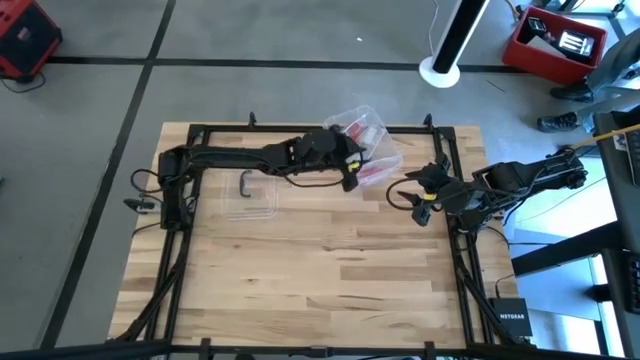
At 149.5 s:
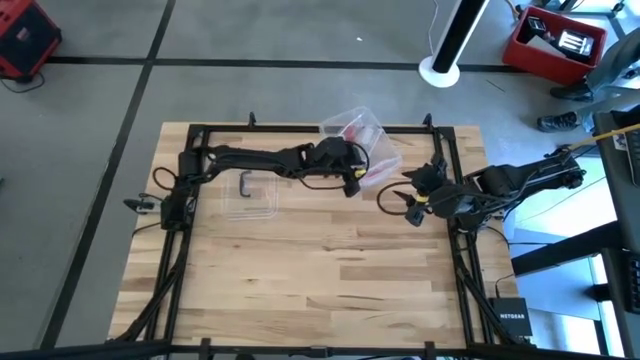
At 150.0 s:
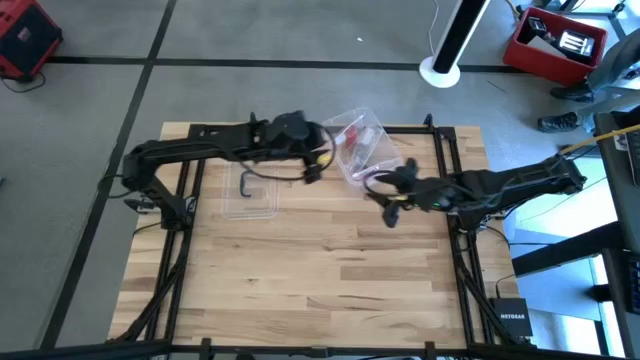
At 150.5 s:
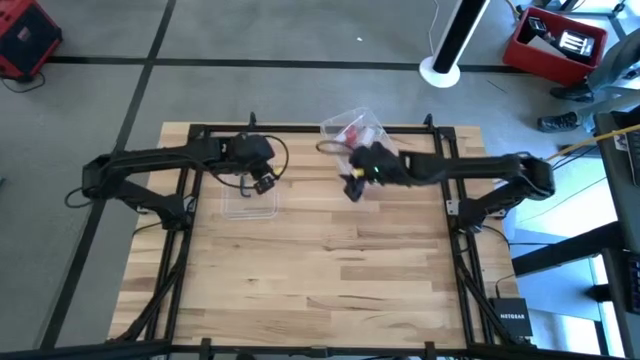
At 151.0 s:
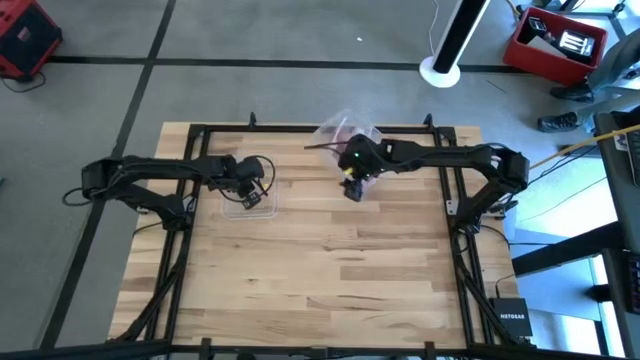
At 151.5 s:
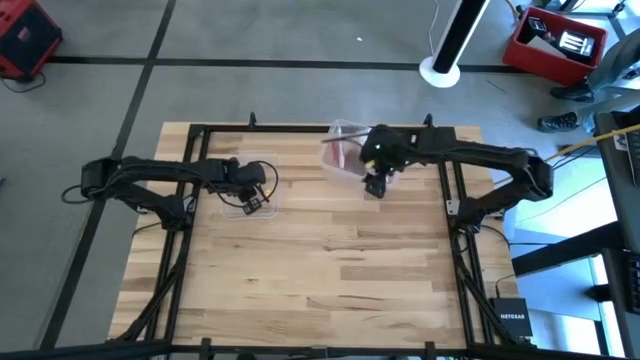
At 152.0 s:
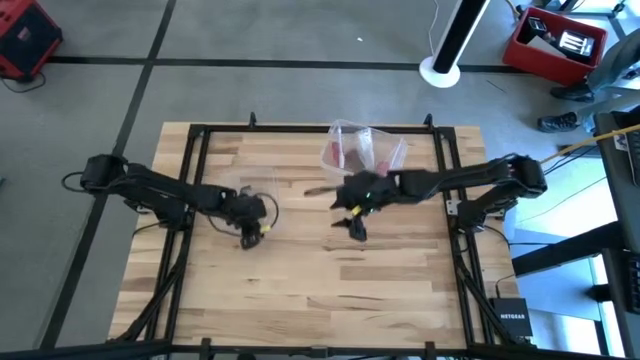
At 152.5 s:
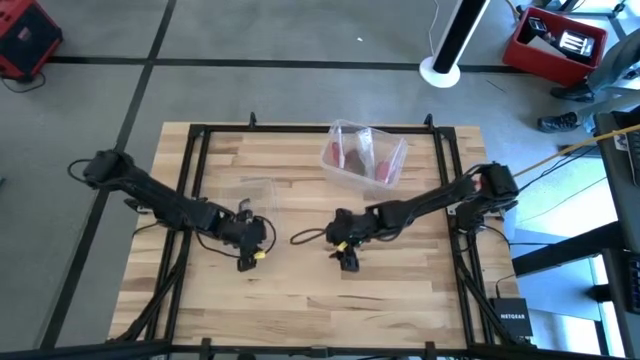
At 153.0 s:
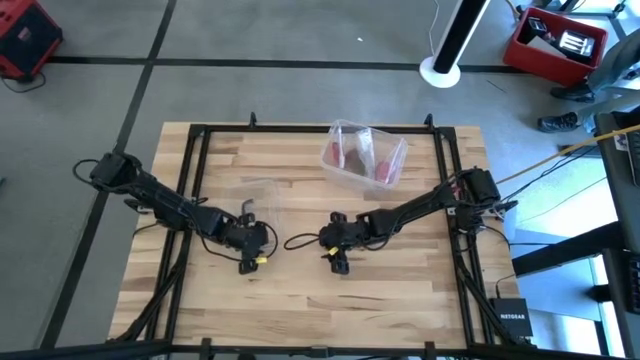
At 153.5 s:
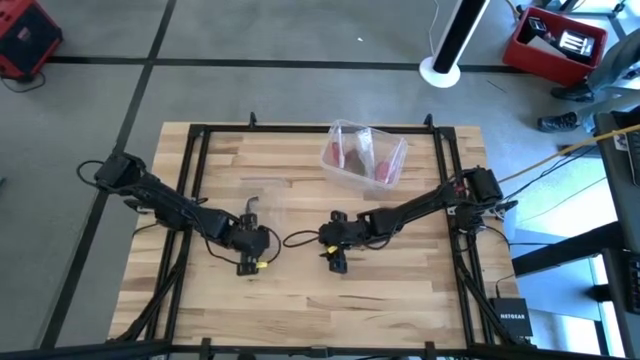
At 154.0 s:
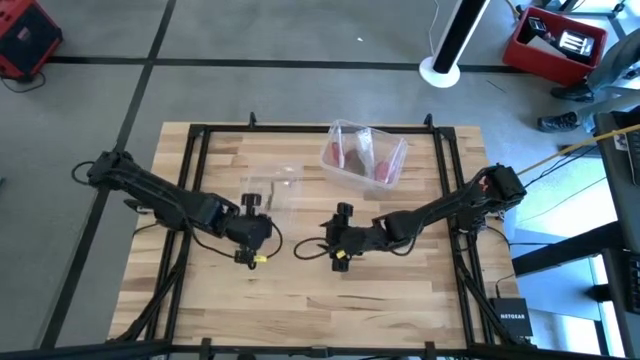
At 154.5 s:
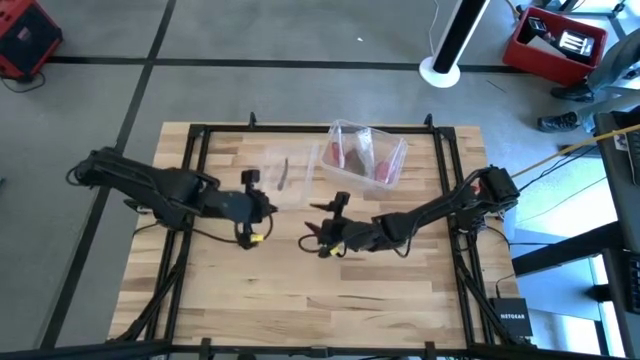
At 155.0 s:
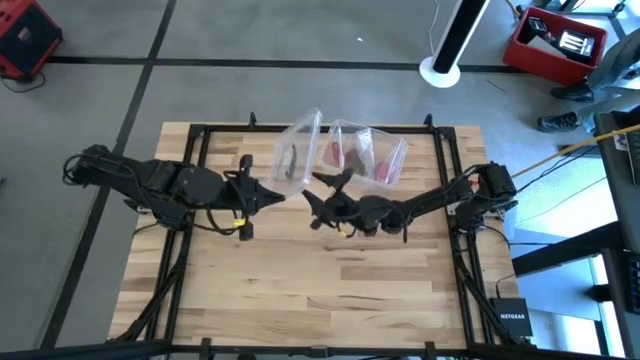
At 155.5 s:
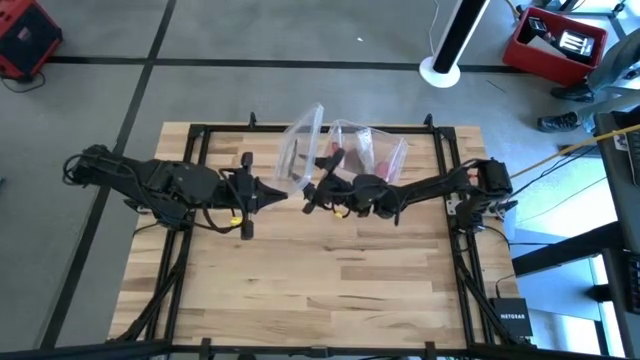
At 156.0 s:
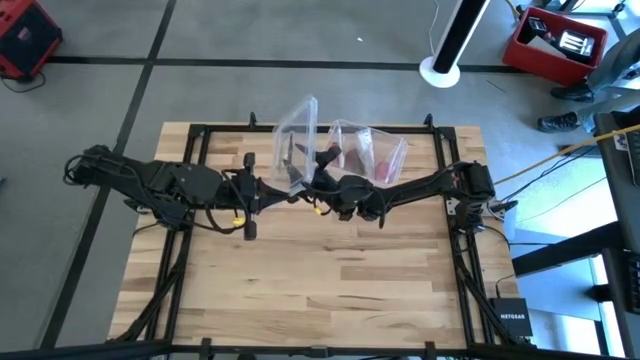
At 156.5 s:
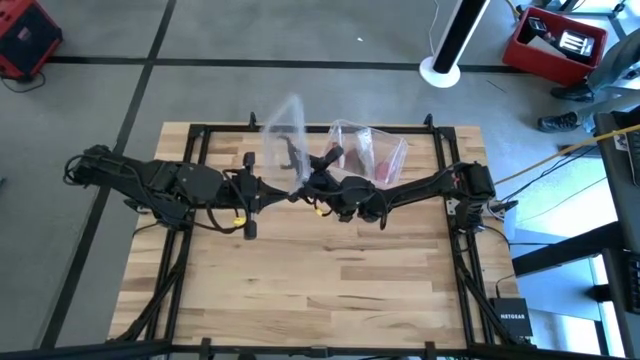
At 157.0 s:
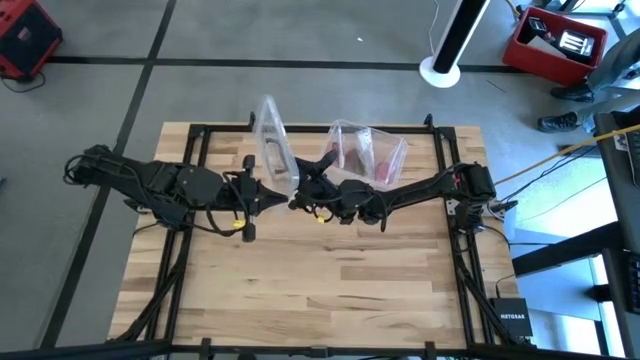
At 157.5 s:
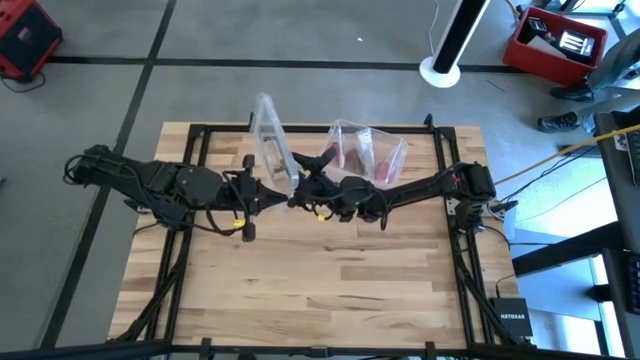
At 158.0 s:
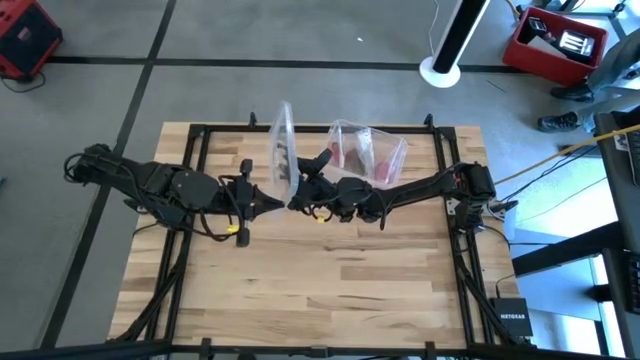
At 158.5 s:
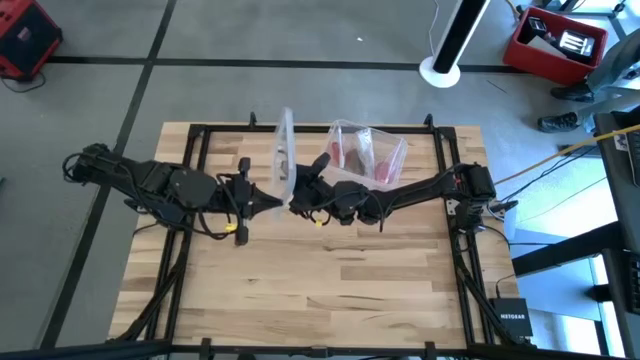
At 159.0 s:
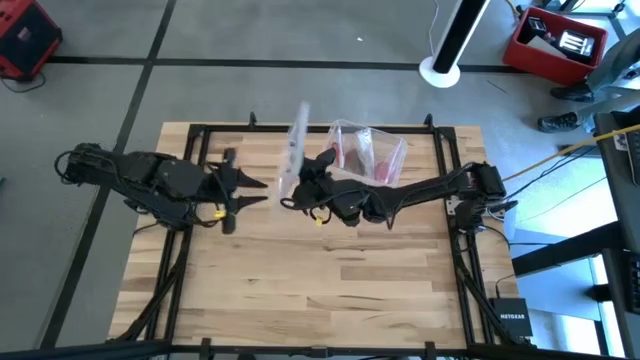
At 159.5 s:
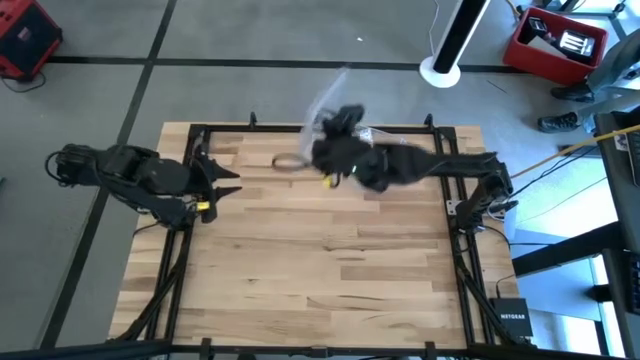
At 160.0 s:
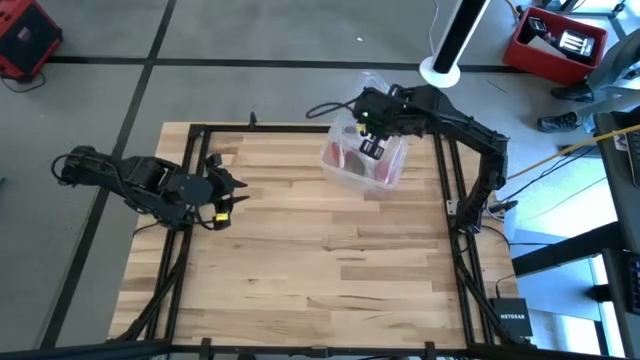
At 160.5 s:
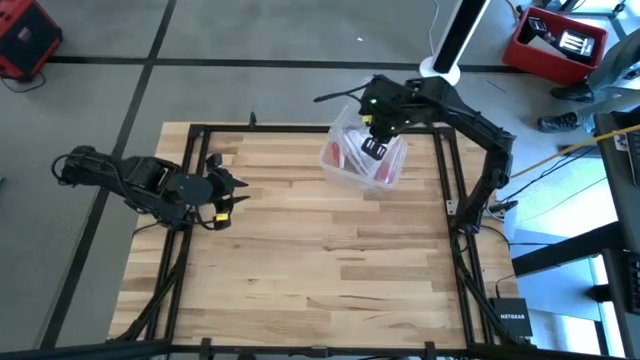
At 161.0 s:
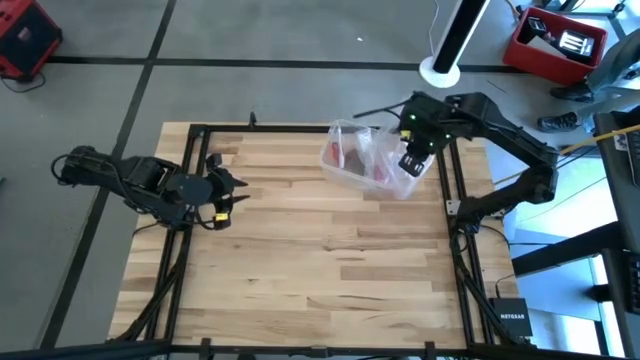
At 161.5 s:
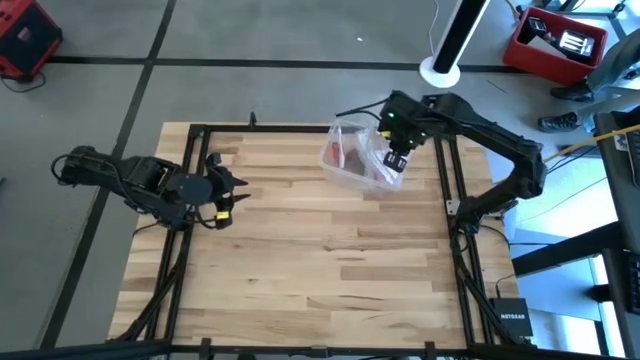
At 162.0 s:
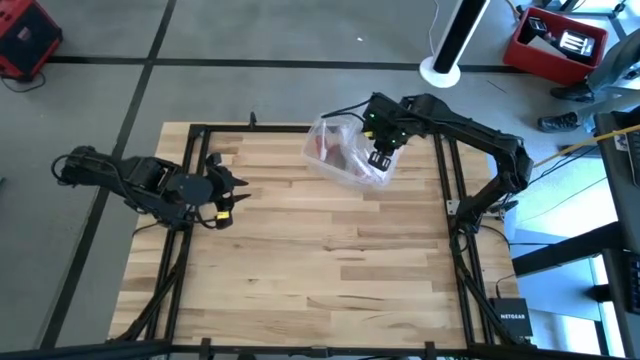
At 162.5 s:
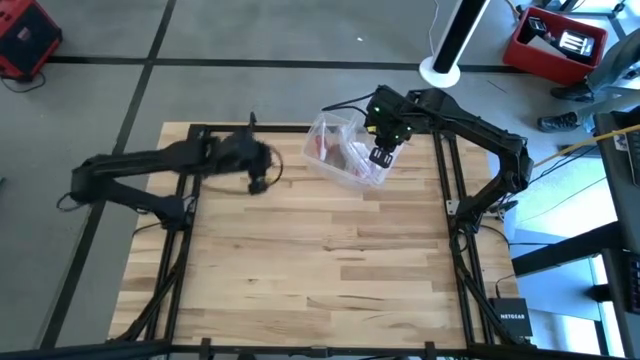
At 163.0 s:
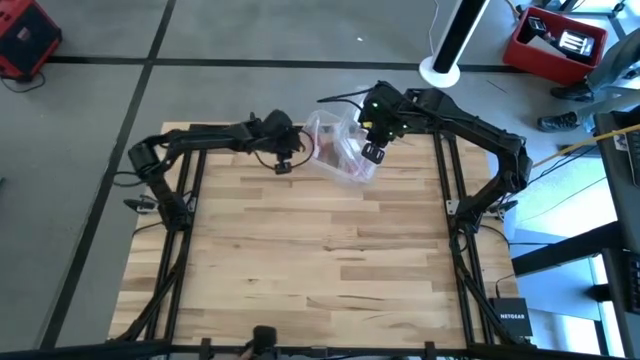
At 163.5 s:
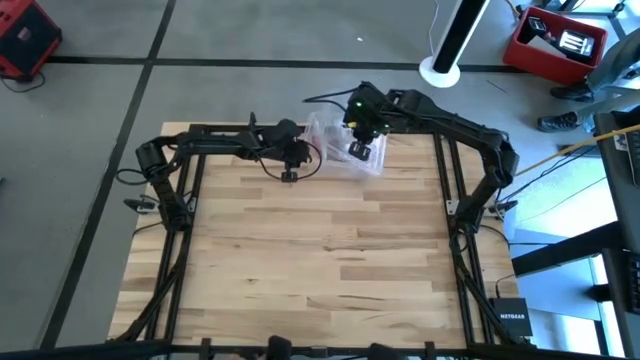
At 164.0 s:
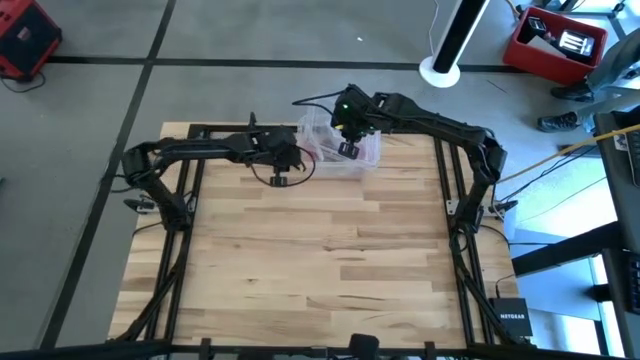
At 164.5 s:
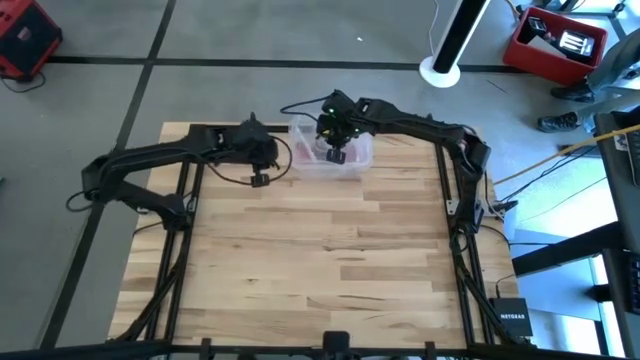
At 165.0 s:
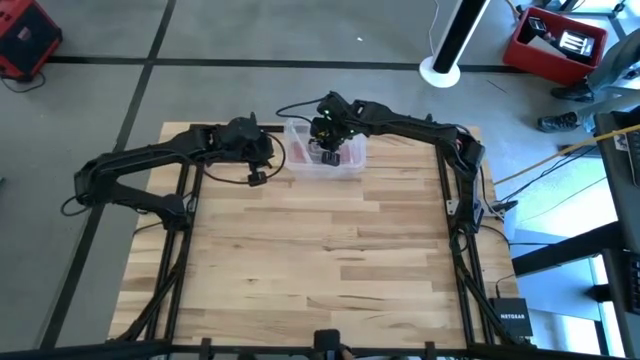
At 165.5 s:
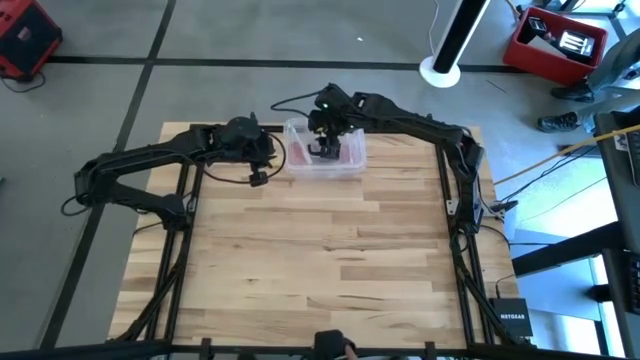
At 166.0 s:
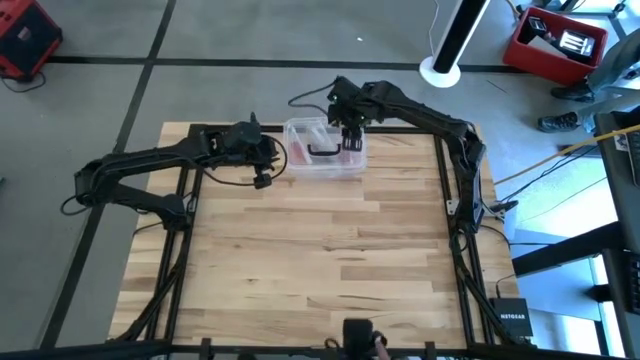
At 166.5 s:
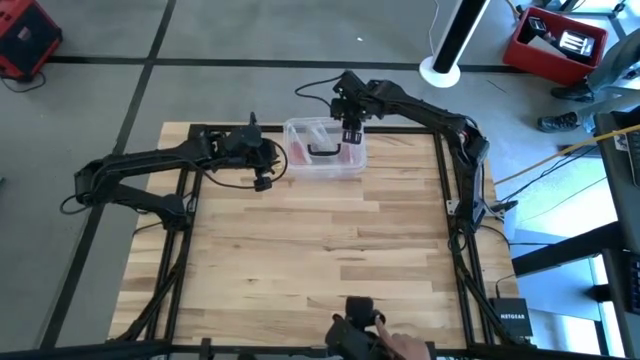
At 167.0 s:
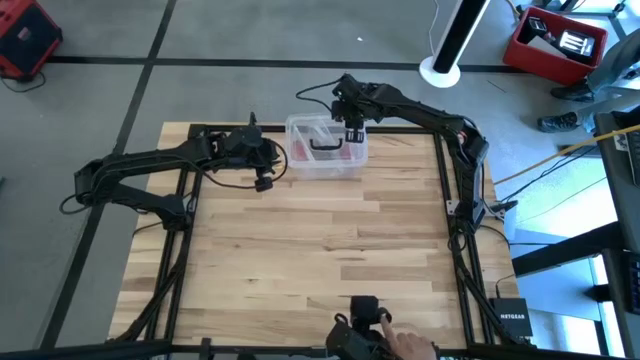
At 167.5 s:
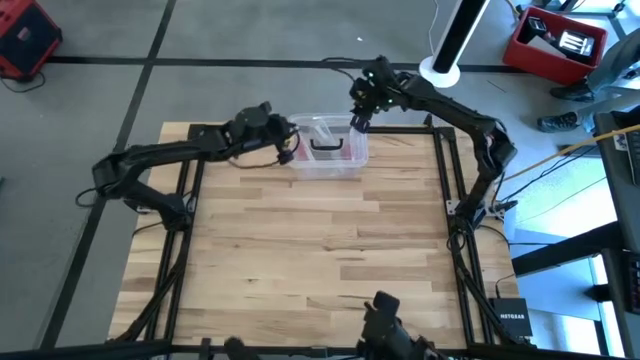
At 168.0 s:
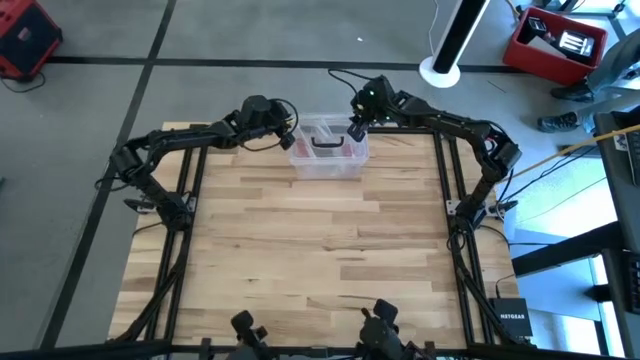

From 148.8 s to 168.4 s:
Task: Roll bandage
Close the transparent bin

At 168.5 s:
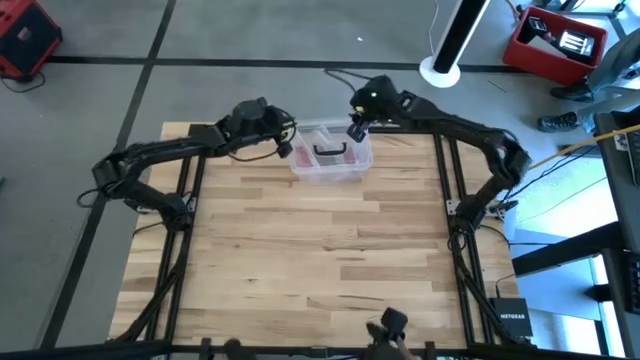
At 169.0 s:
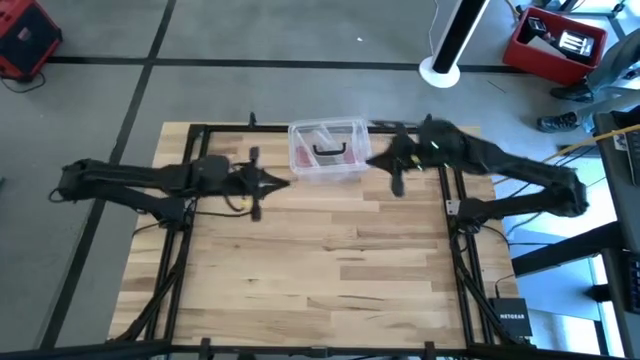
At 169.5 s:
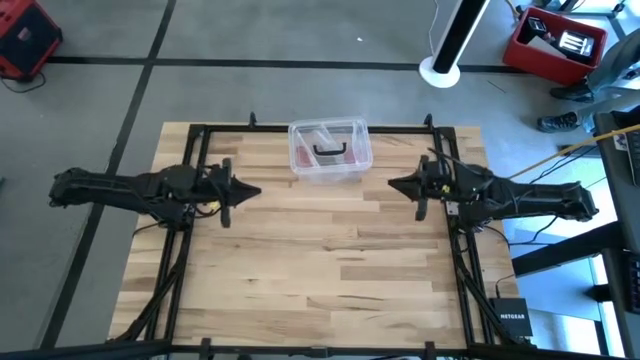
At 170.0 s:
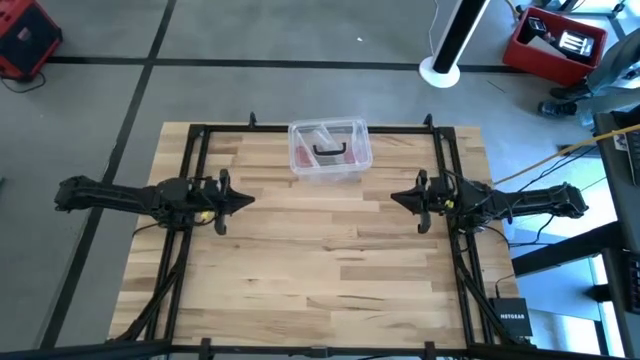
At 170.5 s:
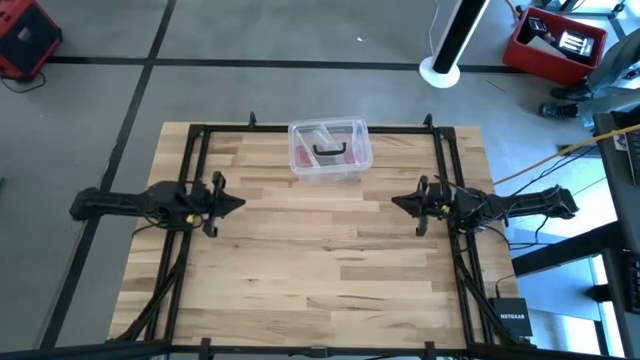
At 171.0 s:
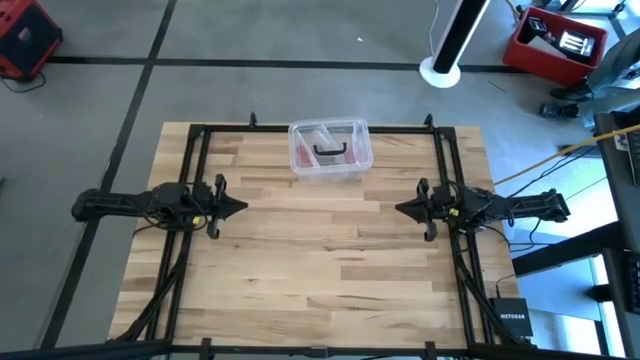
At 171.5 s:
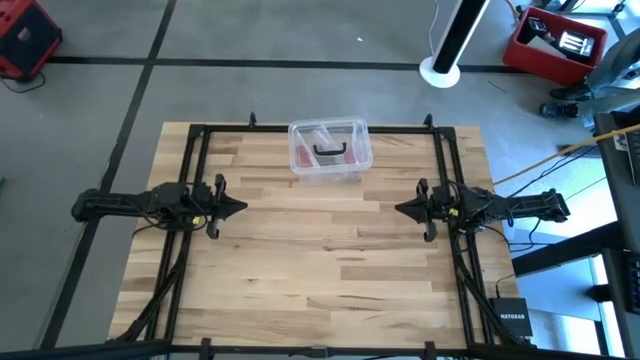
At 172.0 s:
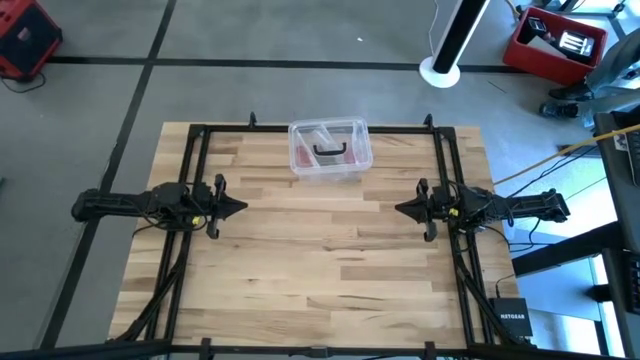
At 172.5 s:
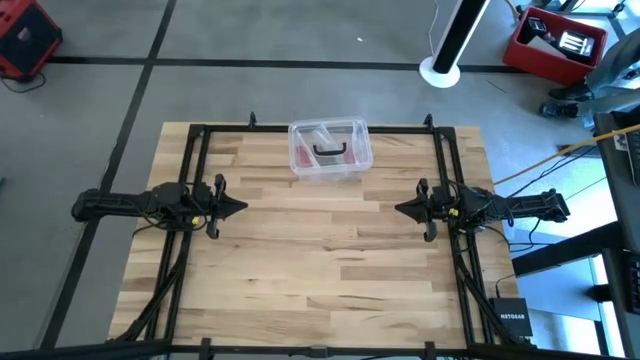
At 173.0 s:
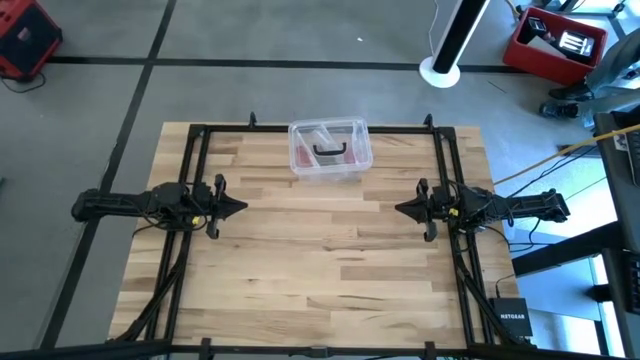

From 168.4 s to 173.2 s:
Return to Home Position
